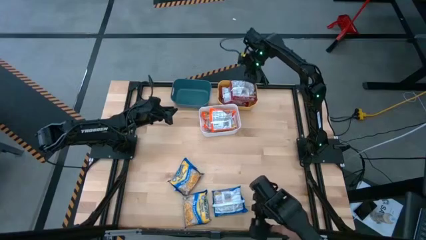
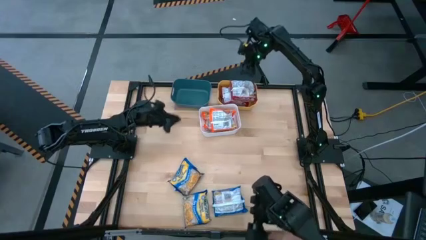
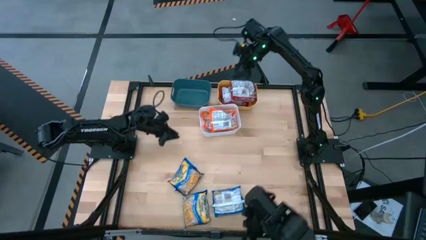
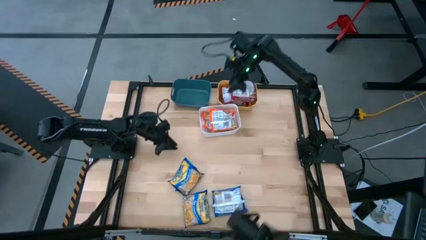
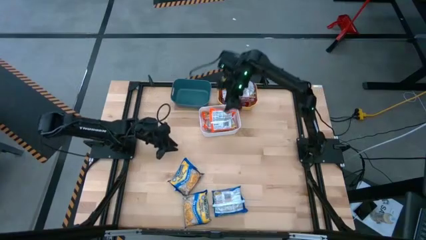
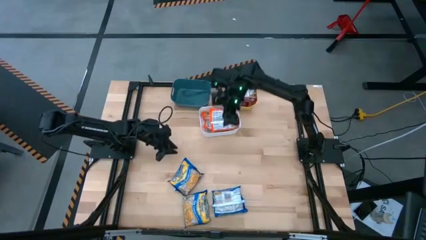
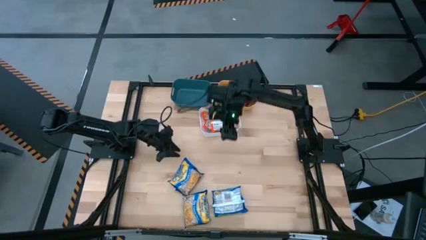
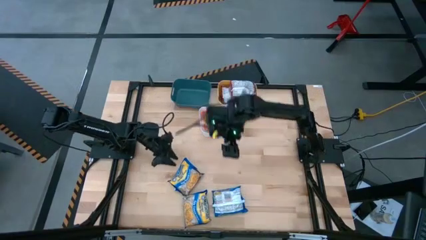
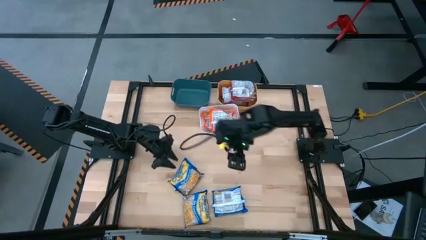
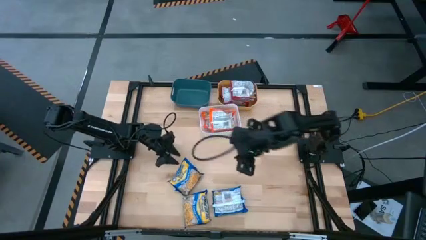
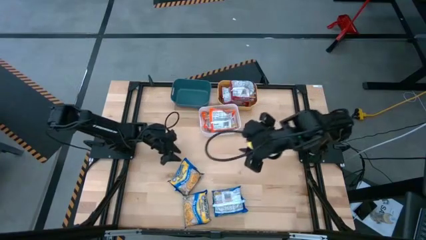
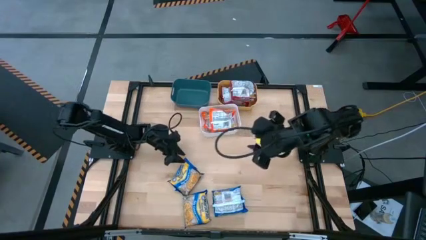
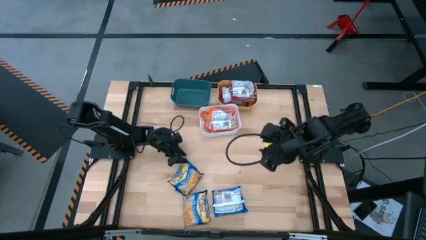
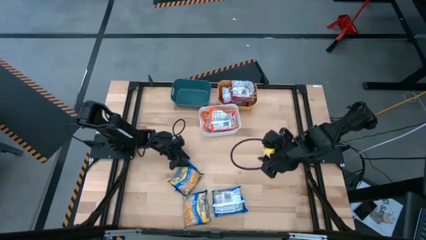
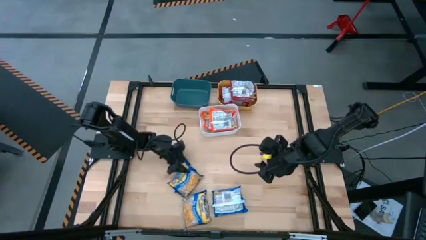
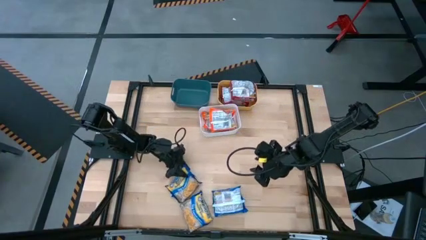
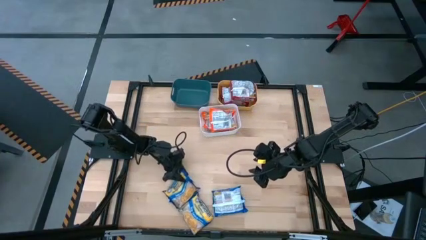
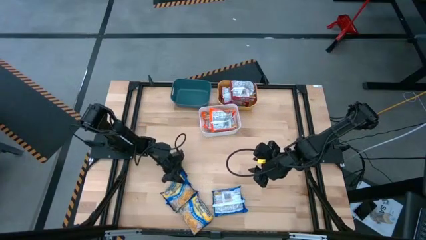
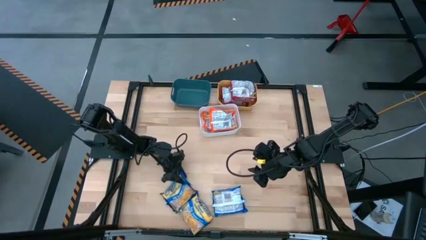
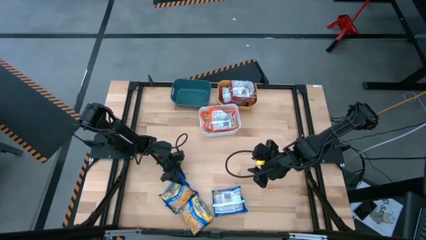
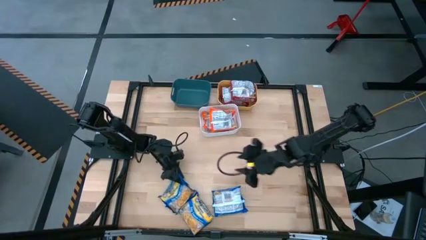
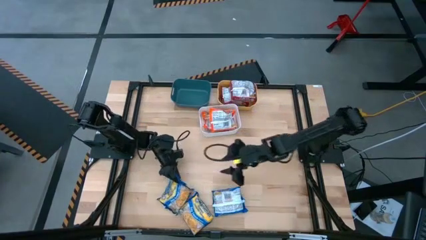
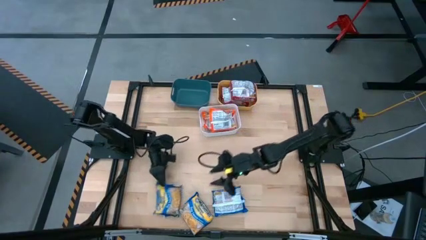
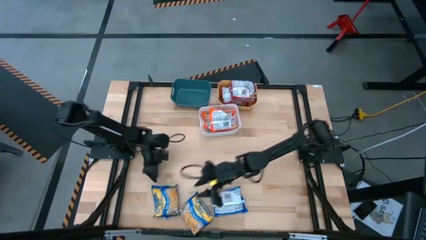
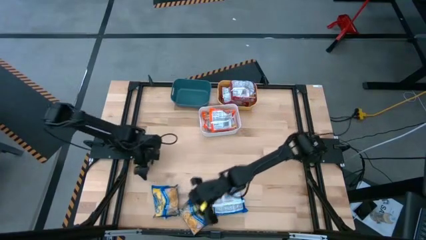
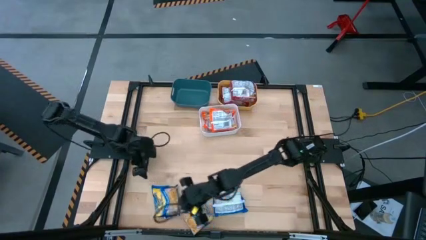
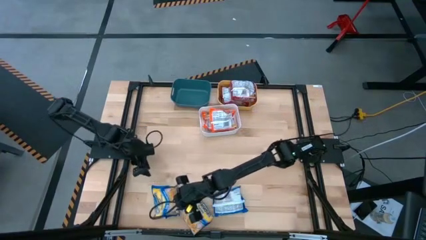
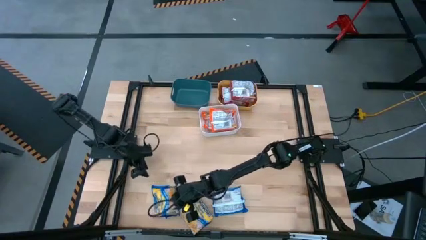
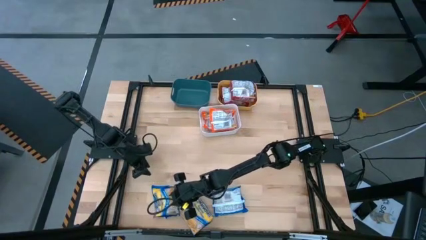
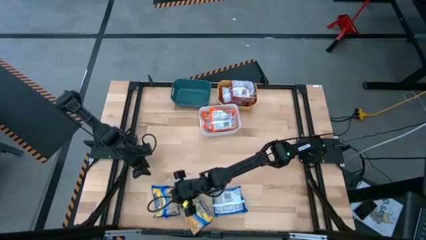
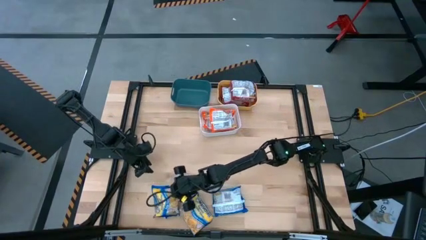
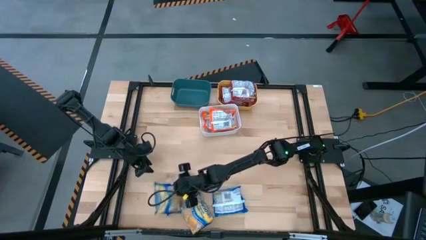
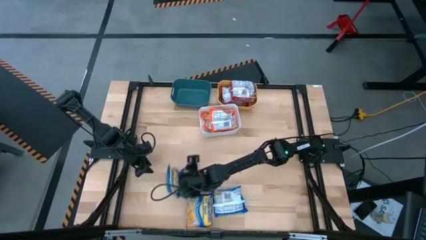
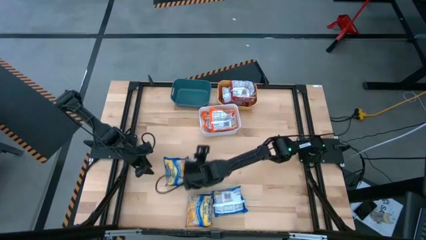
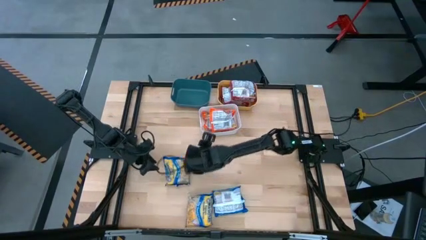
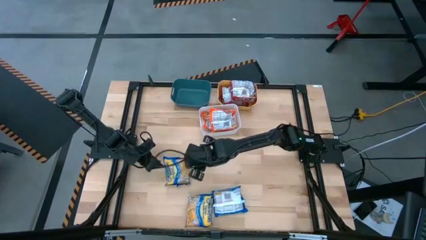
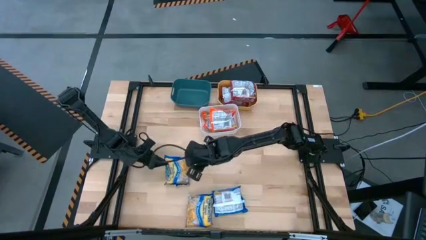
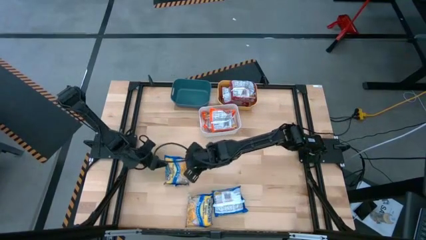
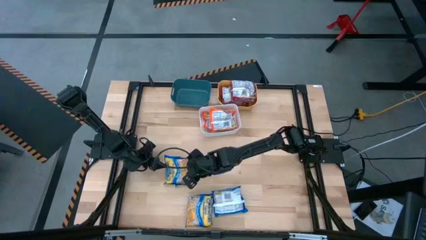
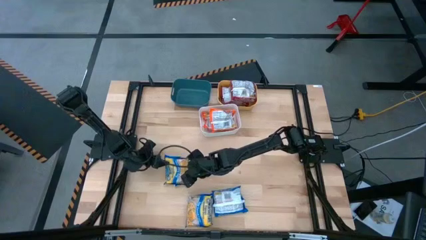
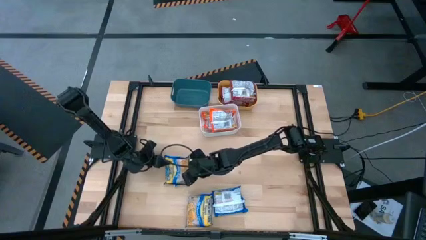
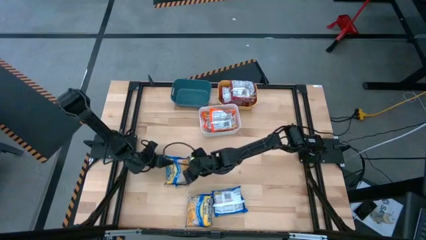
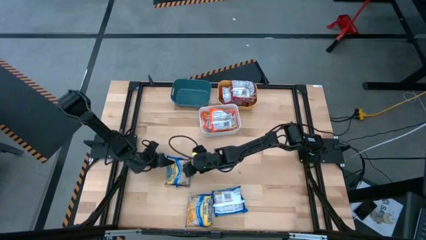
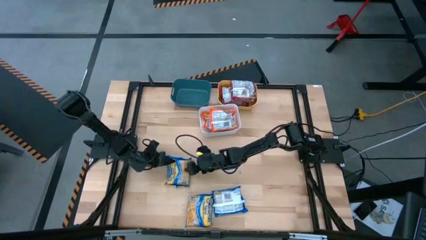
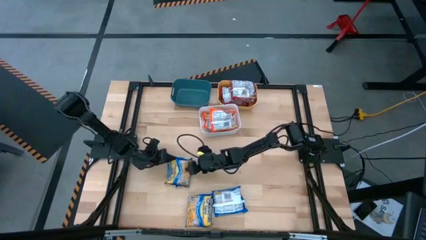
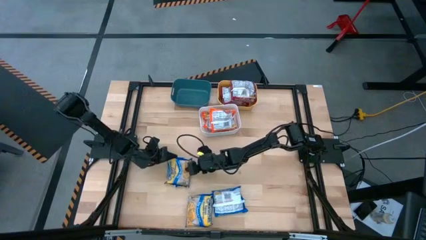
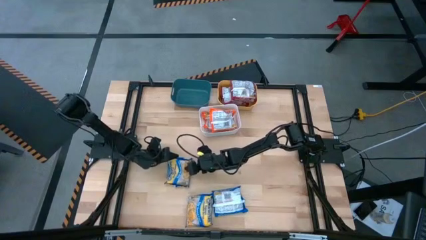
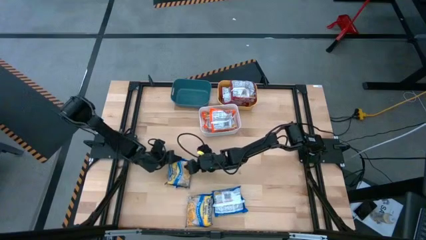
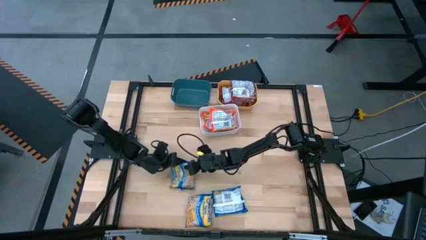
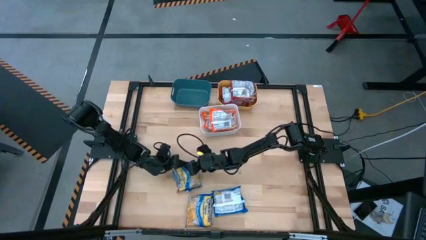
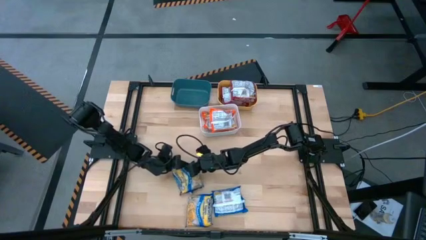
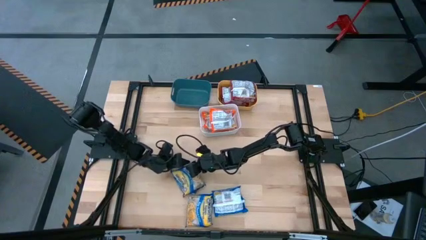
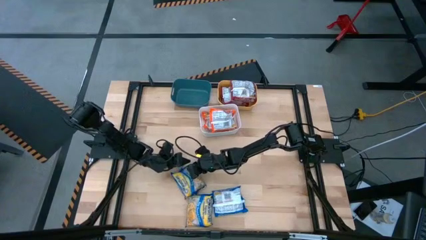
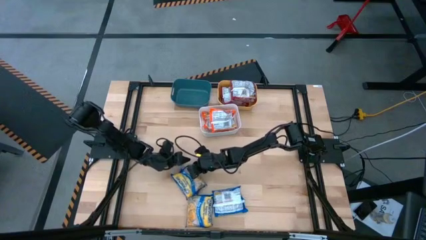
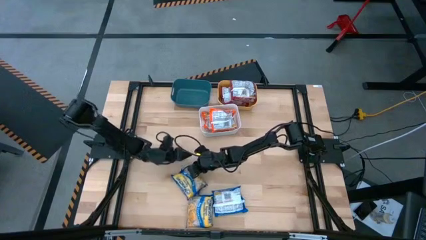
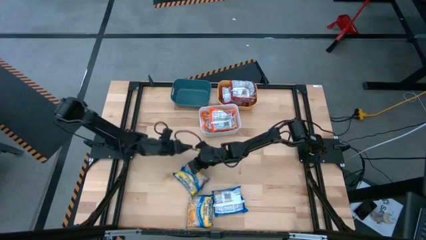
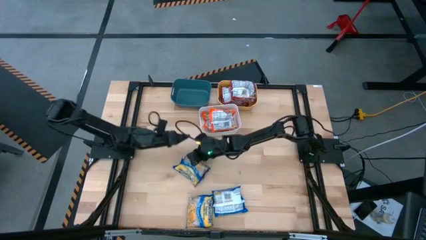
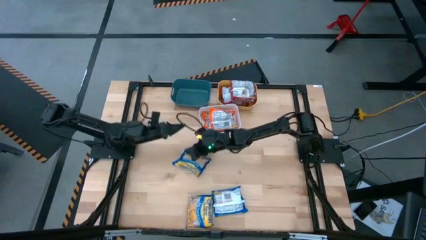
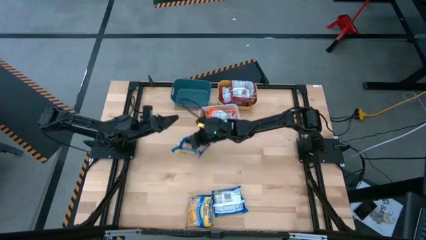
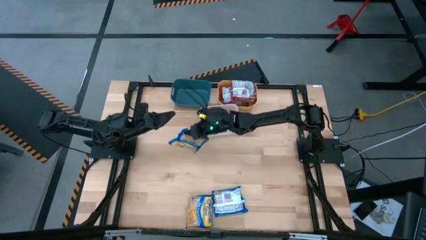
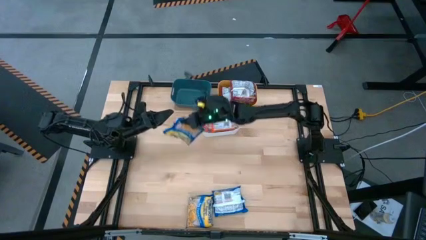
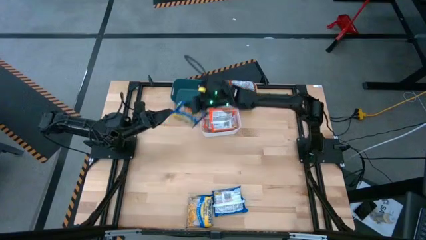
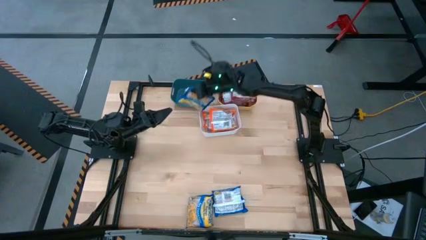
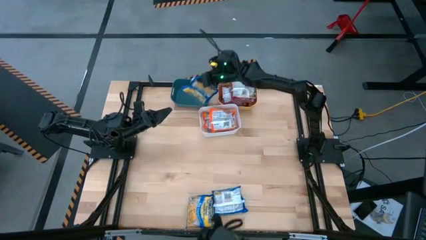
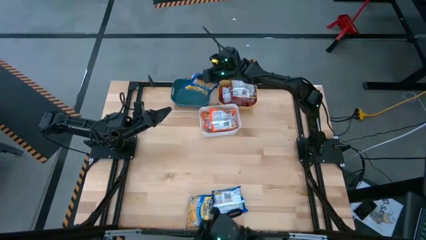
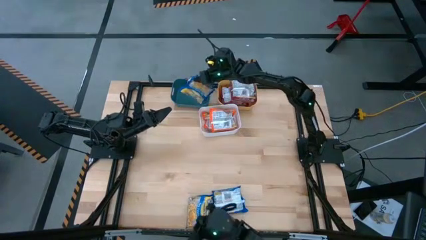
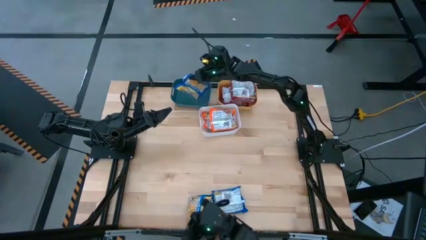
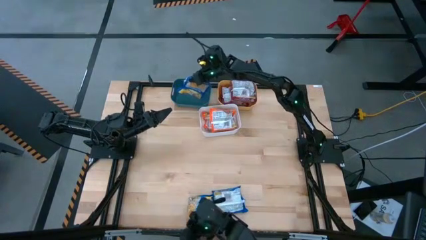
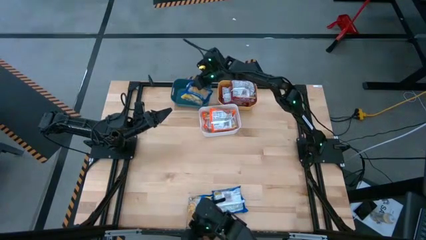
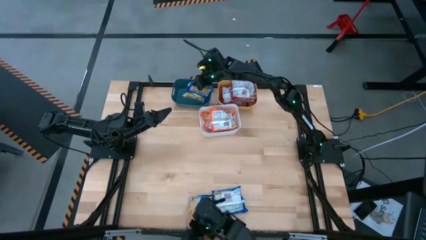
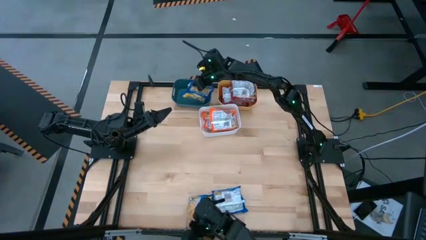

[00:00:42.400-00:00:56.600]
Task: Sort Maruchan noodles
Put the top right blue noodle pack into the blue bin
